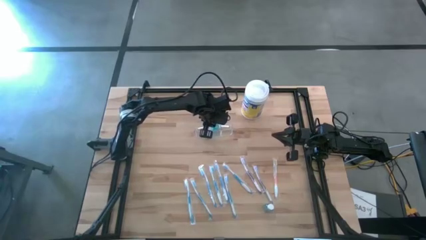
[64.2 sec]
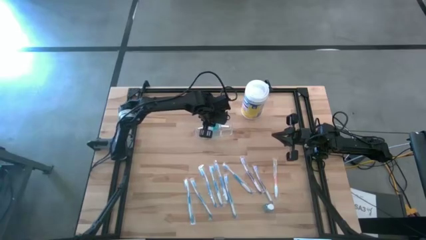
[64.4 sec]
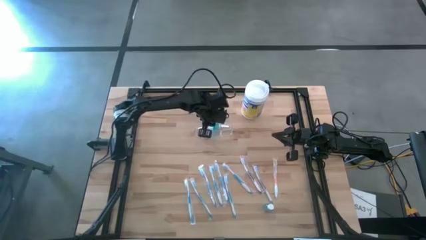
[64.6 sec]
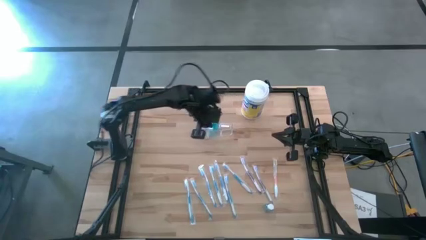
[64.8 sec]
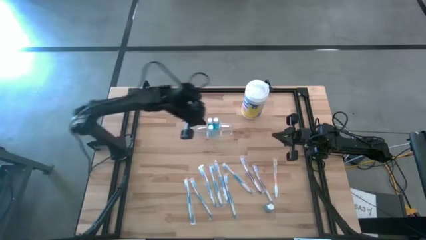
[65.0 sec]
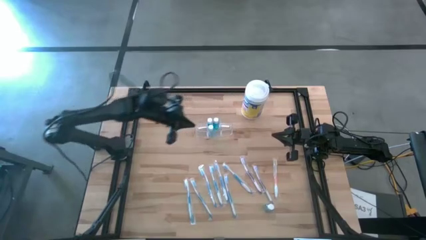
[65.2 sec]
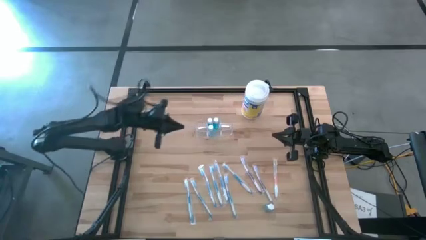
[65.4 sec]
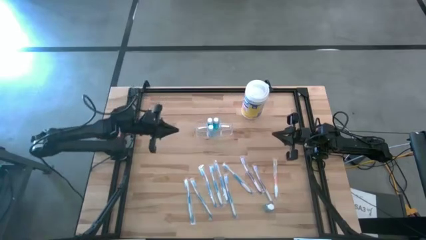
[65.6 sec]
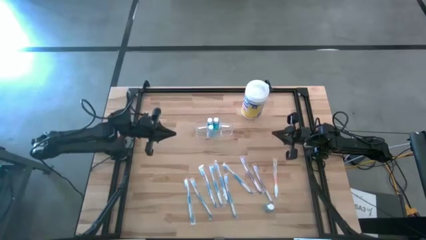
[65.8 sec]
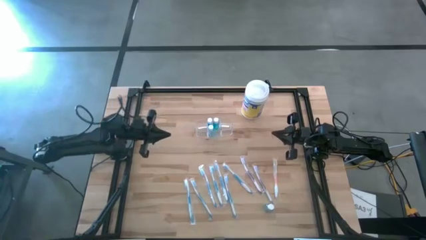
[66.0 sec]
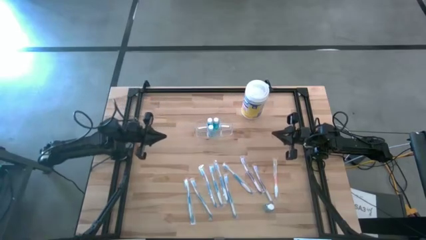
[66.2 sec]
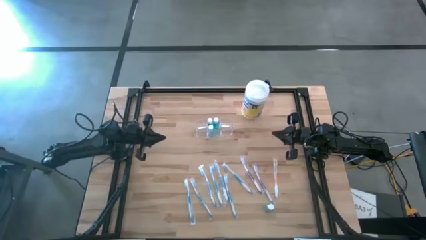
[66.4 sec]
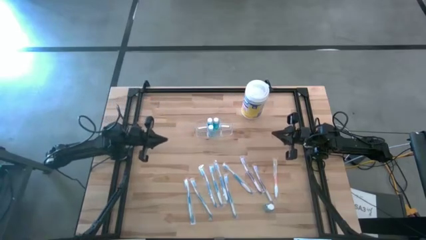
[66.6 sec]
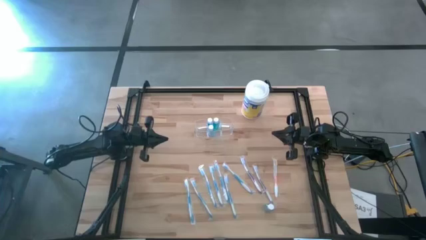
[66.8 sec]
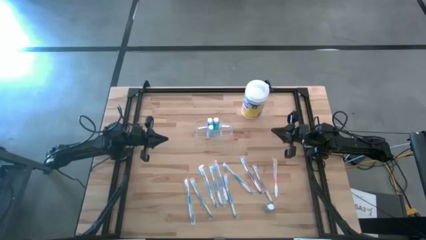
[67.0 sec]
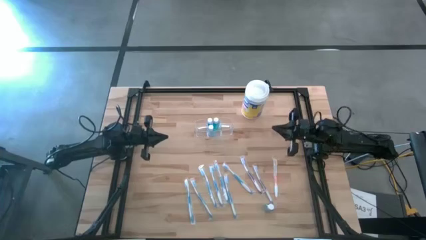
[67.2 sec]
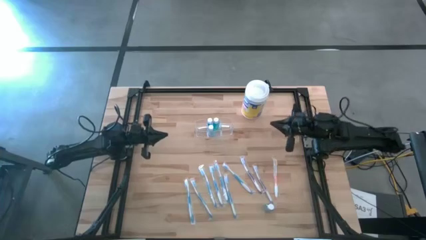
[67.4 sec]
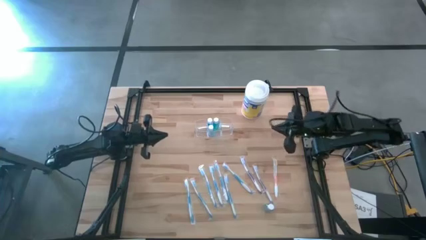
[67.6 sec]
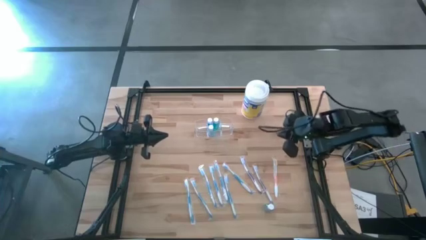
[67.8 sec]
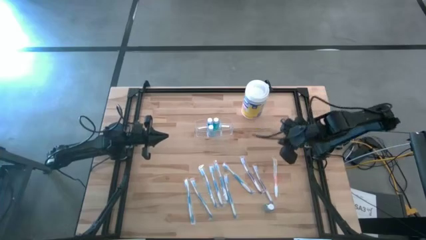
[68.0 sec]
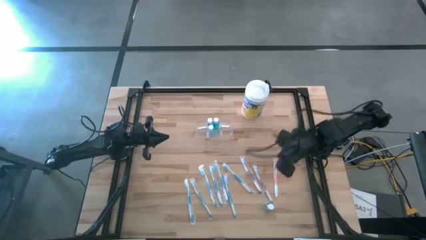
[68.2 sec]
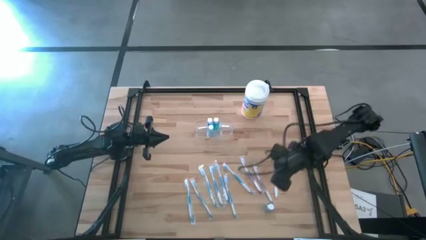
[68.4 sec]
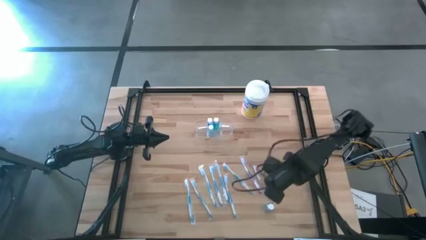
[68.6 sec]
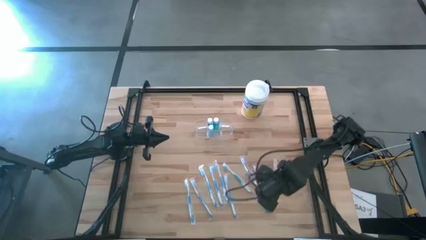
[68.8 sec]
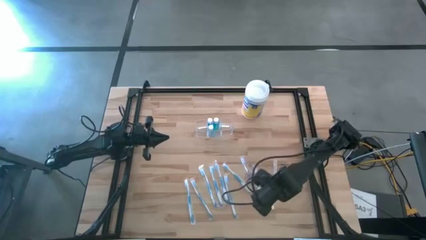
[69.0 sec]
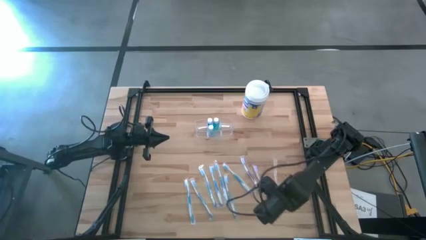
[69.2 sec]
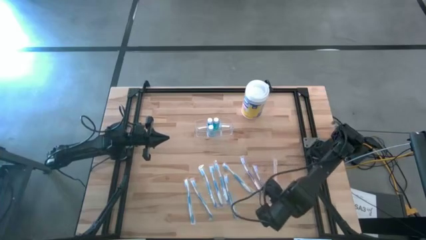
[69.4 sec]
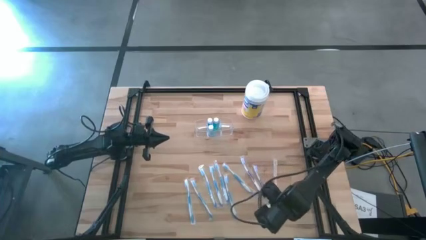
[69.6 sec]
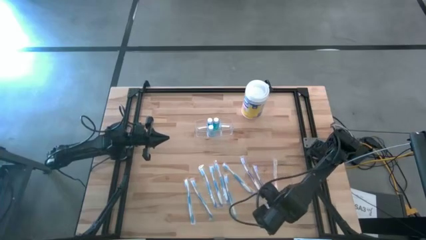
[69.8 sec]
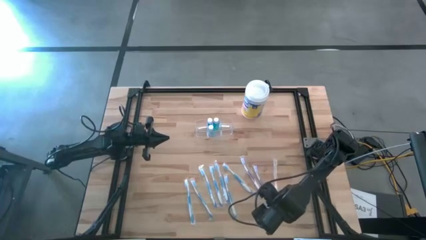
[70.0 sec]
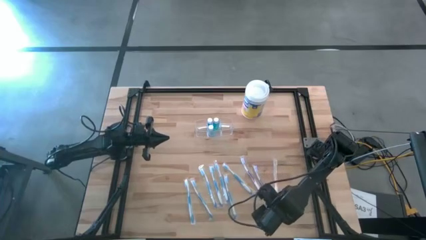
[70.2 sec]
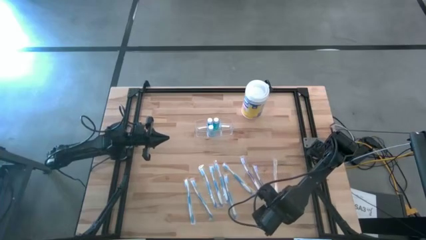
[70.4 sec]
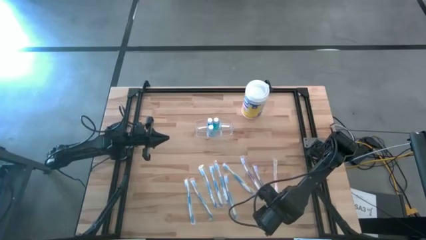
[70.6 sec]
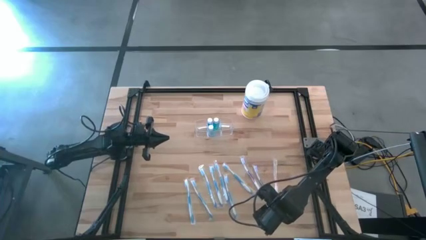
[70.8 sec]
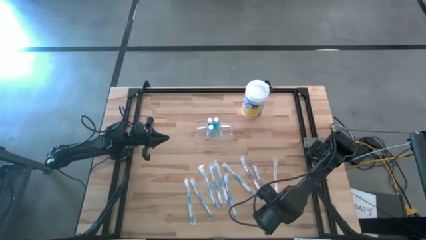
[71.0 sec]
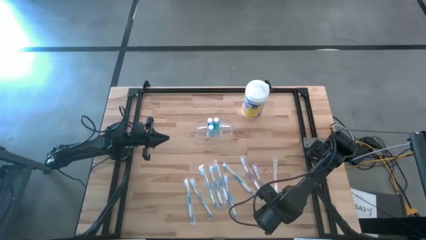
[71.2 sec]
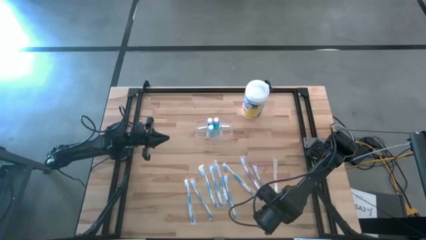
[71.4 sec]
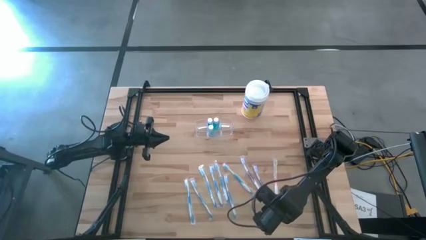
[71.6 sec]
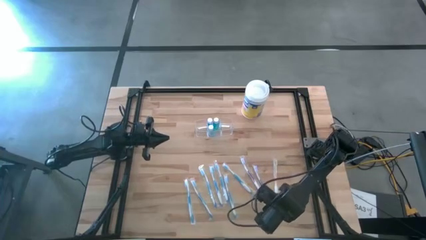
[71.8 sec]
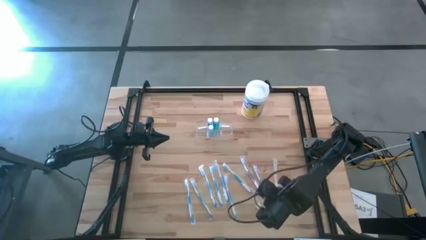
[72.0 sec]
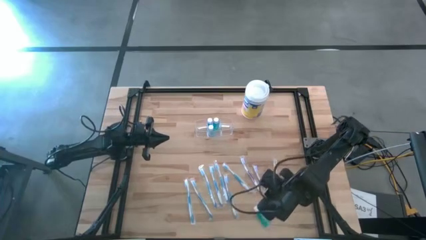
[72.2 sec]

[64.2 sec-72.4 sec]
Task: Pick & Place toothbrushing station
Put the blue mouthwash bottle into the transparent organizer
